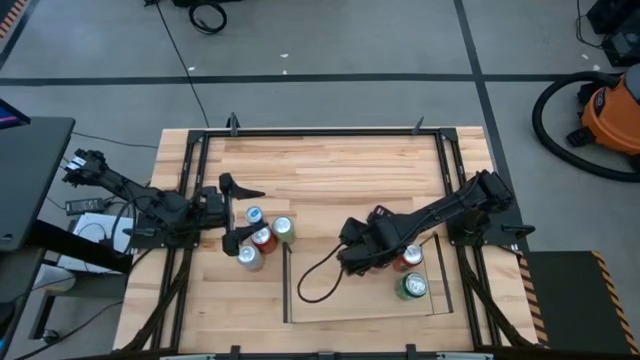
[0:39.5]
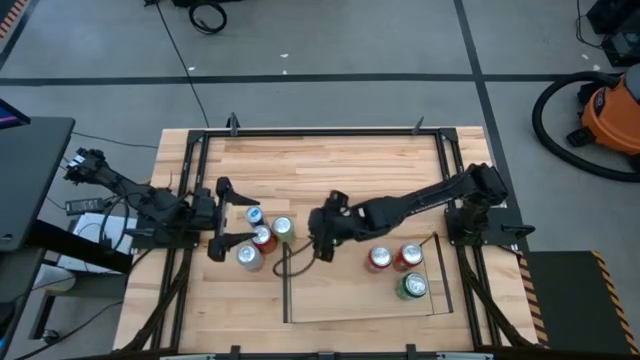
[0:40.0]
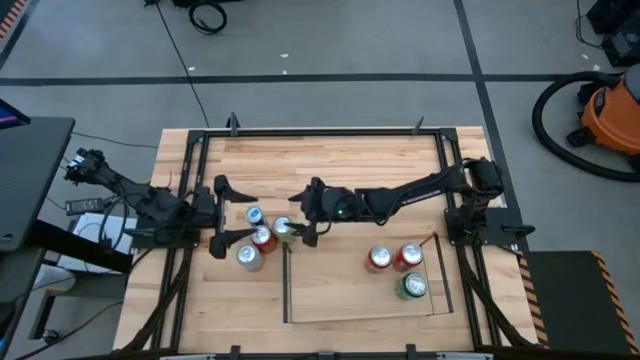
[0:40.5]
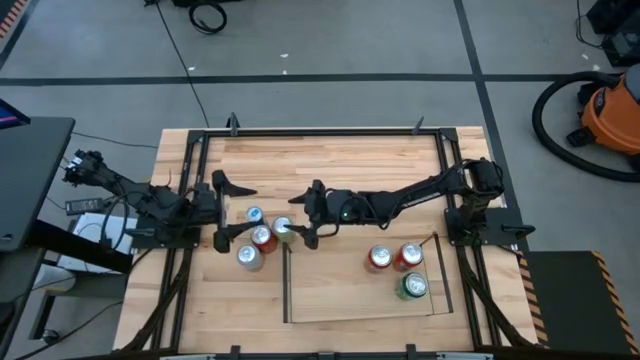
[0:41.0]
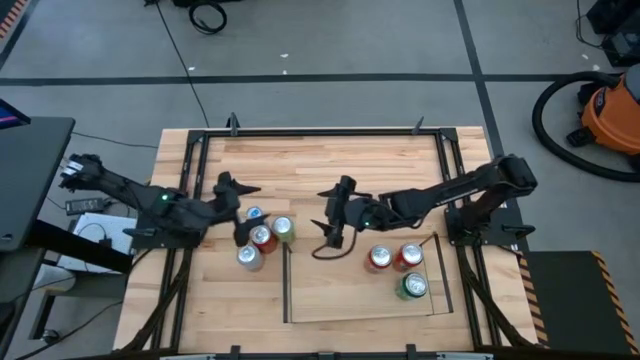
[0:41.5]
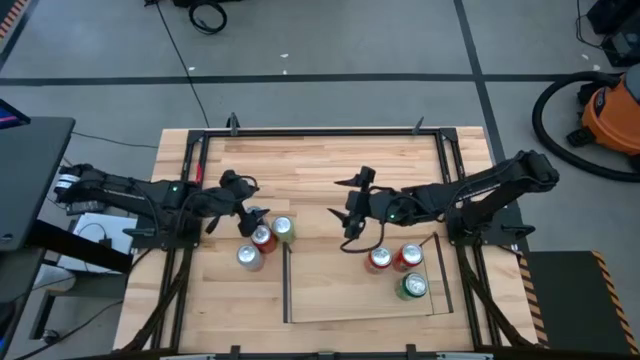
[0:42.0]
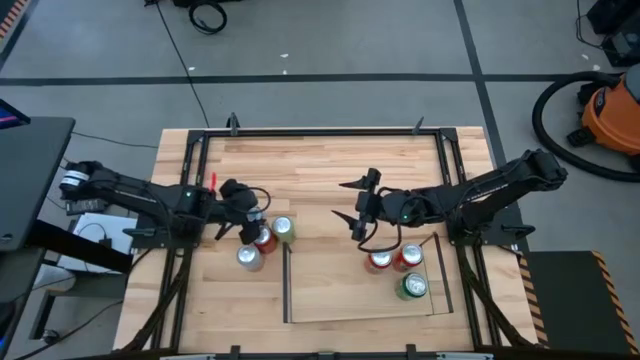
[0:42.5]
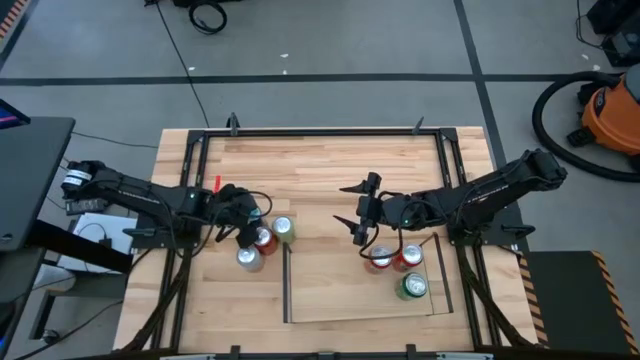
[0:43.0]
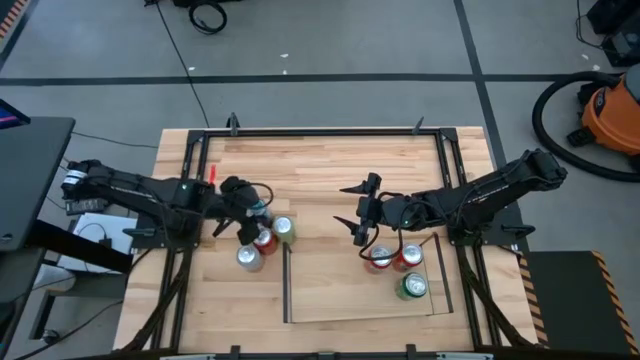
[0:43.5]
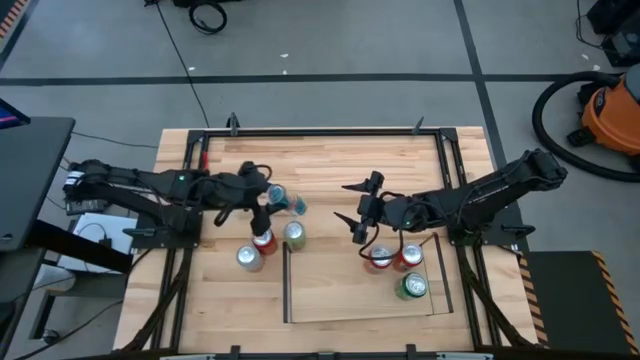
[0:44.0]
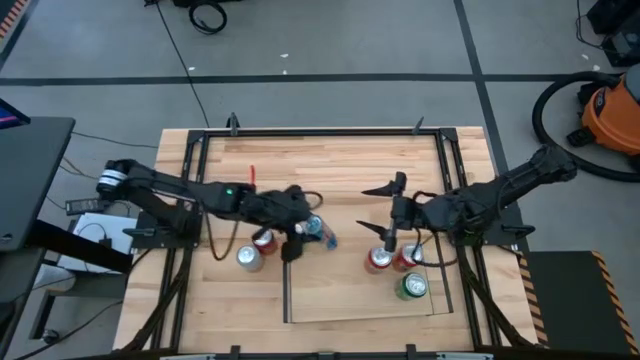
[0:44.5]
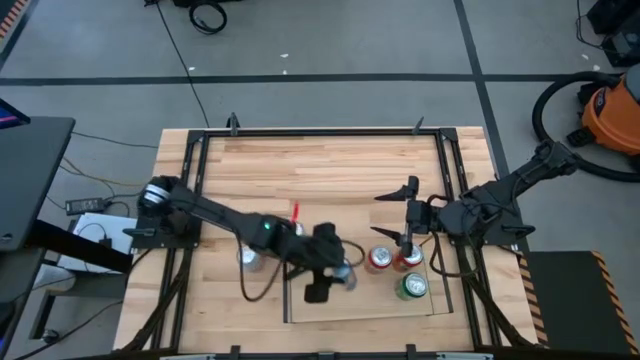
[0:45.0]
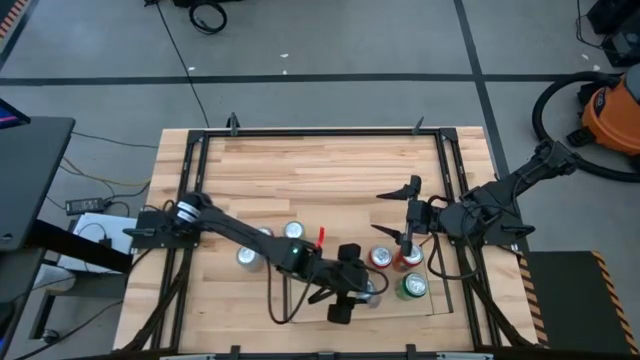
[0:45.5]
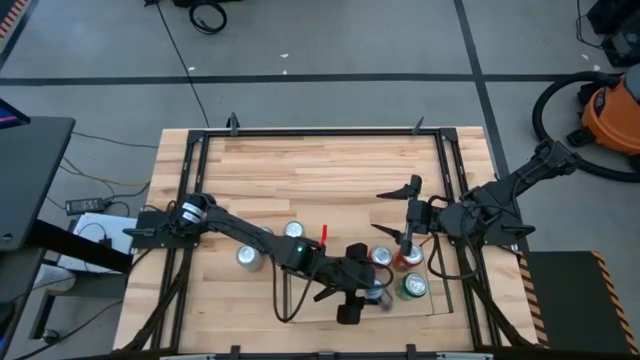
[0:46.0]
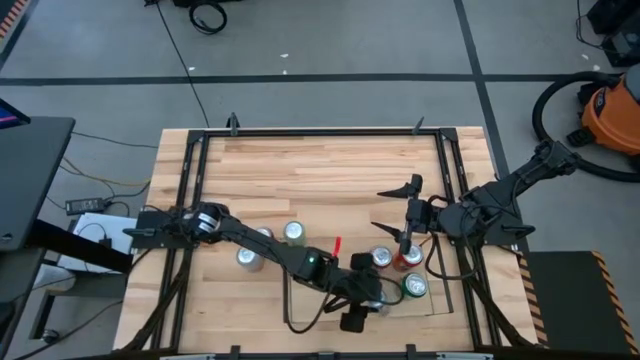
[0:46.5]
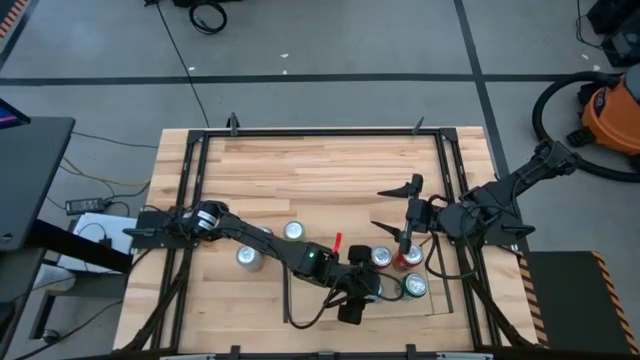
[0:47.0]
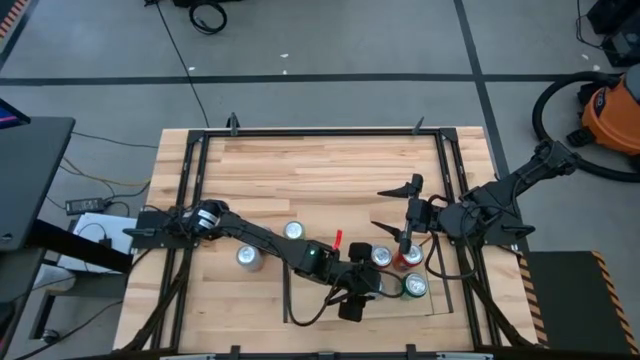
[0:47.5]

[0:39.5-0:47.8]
Task: Place canned beverage on shelf
Put the blue soda can on the shelf

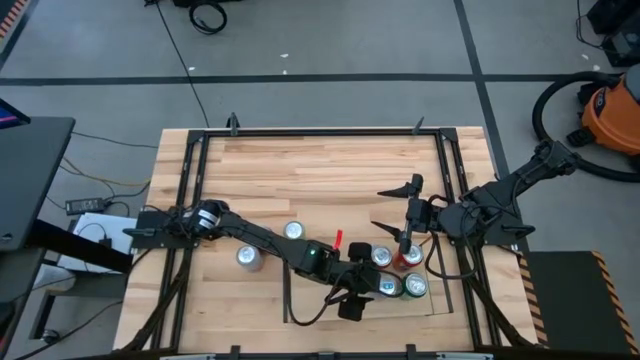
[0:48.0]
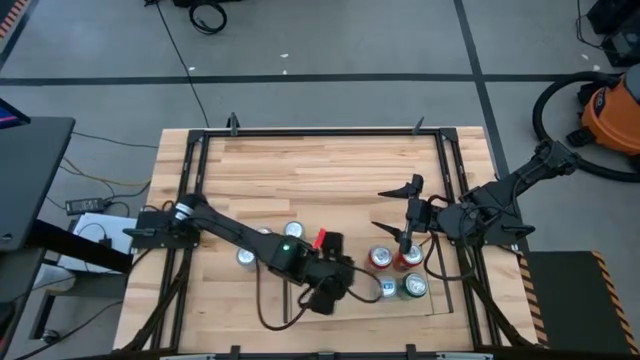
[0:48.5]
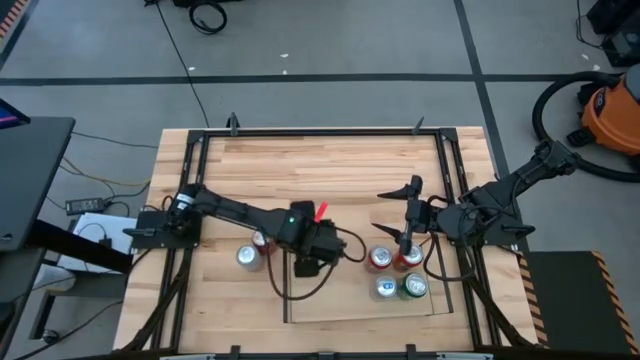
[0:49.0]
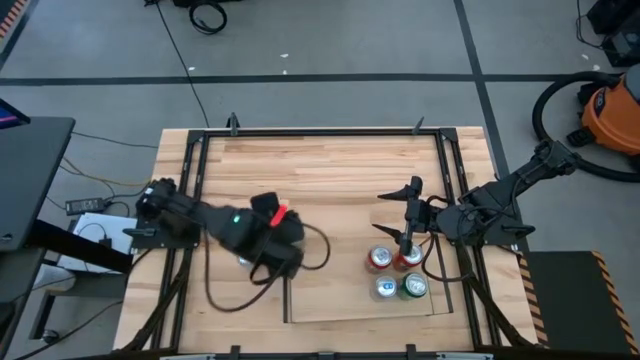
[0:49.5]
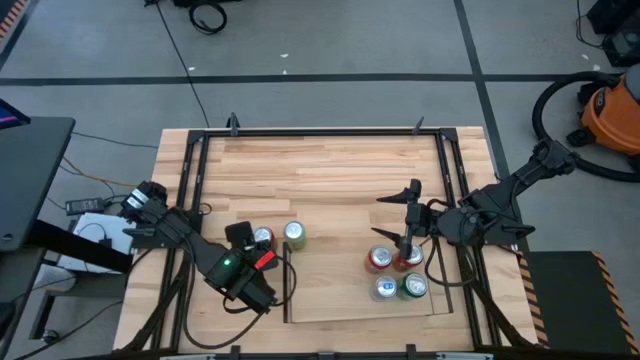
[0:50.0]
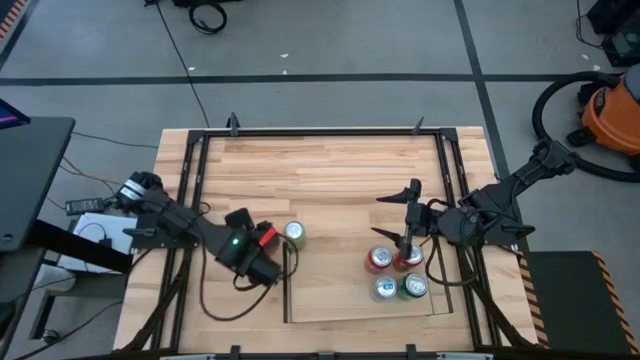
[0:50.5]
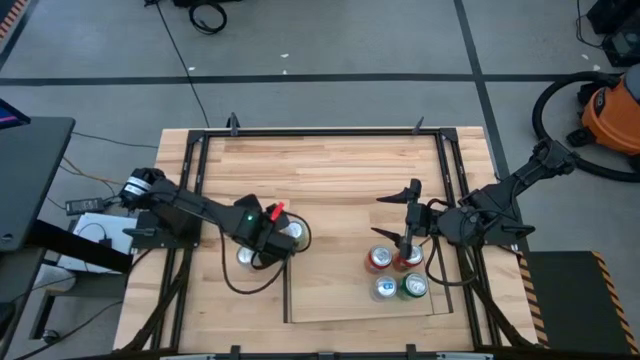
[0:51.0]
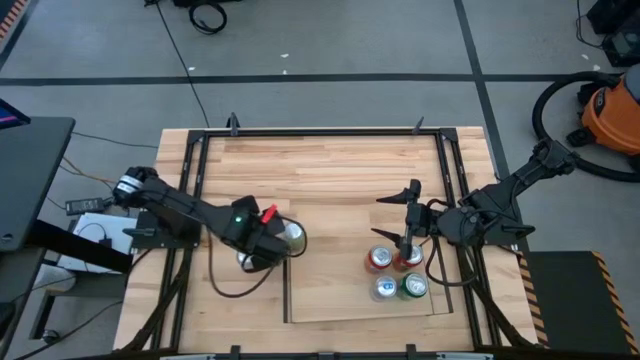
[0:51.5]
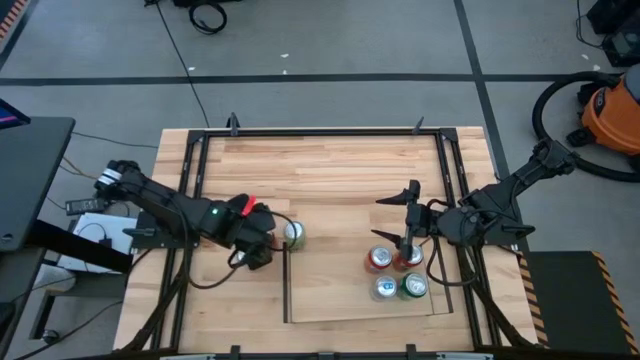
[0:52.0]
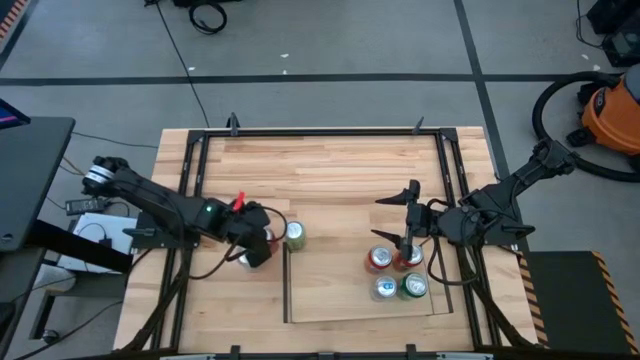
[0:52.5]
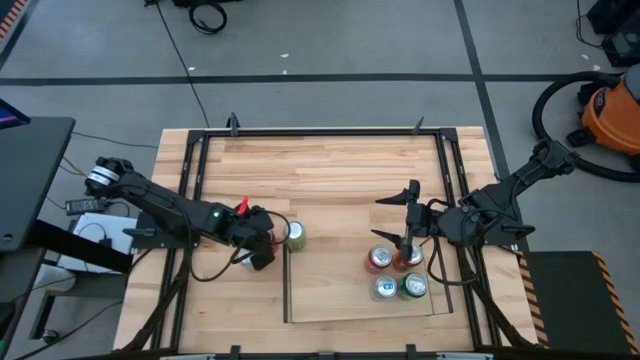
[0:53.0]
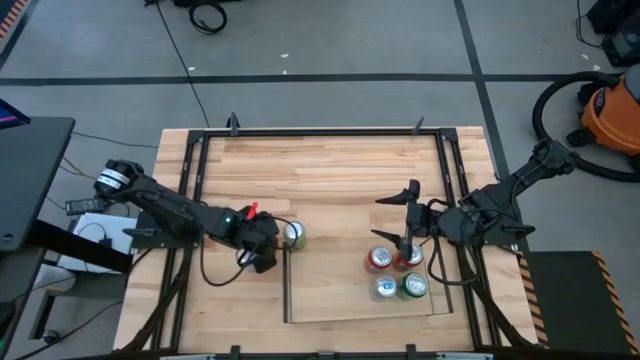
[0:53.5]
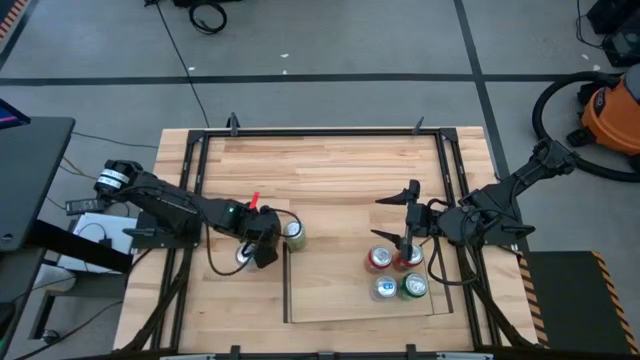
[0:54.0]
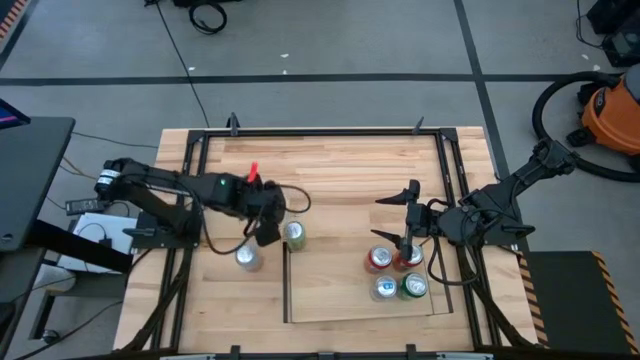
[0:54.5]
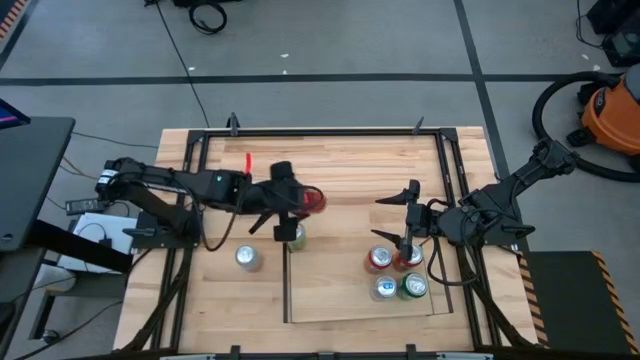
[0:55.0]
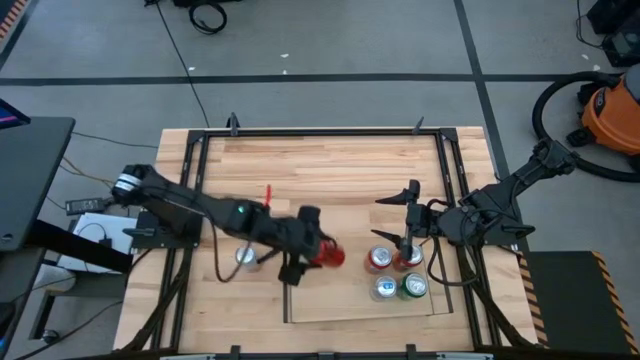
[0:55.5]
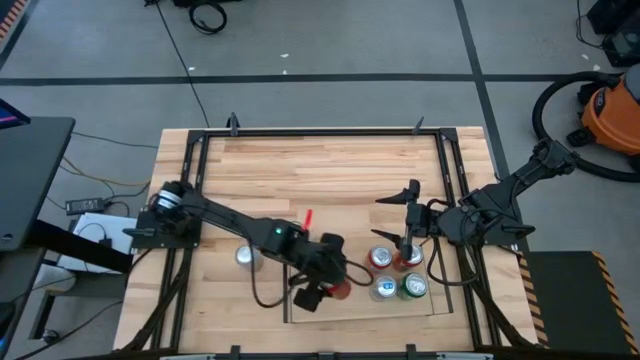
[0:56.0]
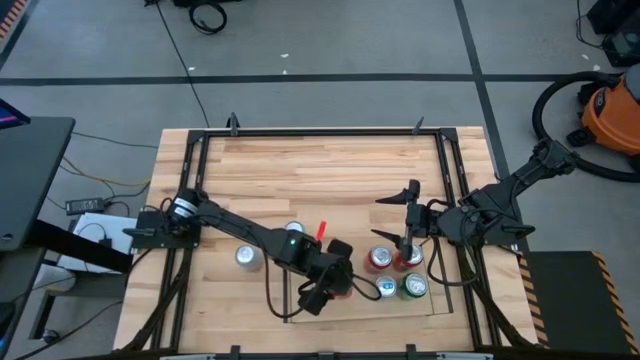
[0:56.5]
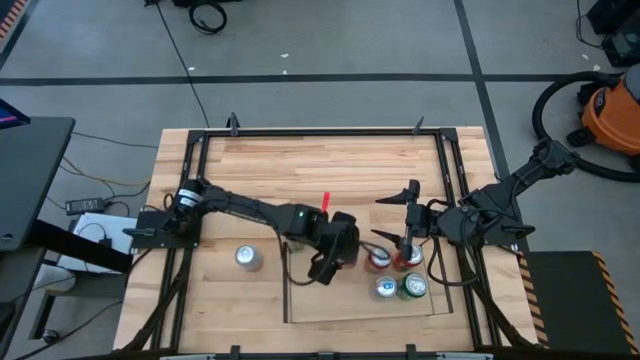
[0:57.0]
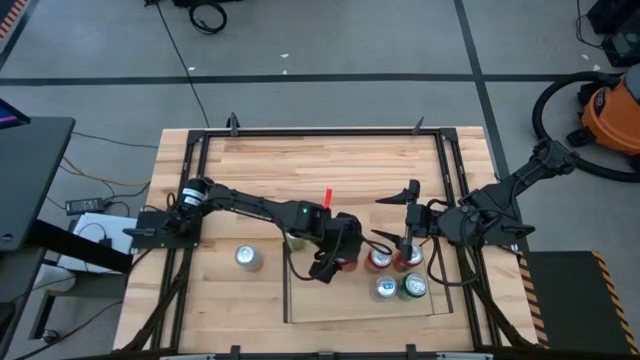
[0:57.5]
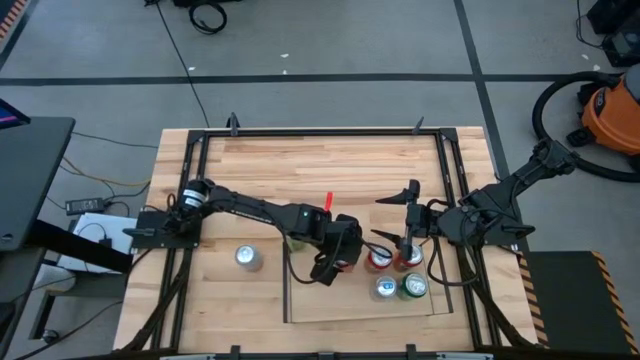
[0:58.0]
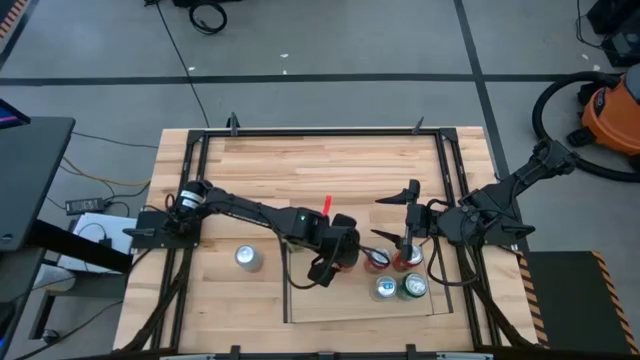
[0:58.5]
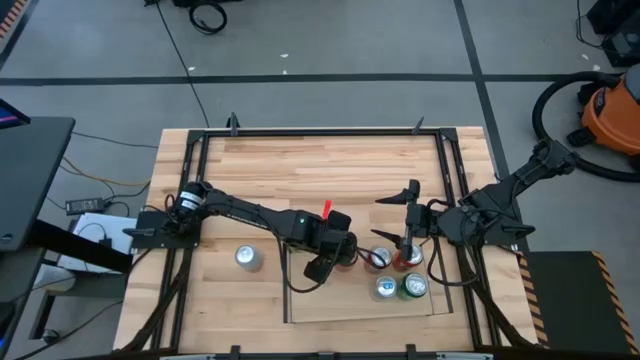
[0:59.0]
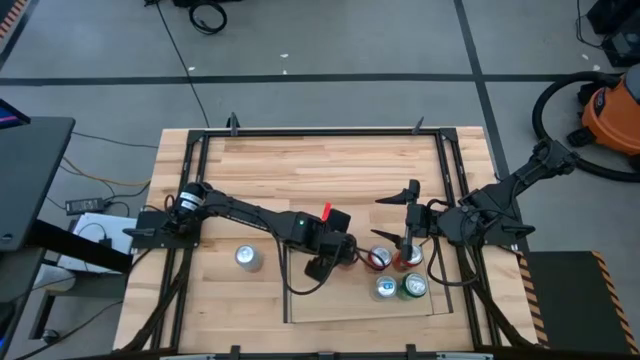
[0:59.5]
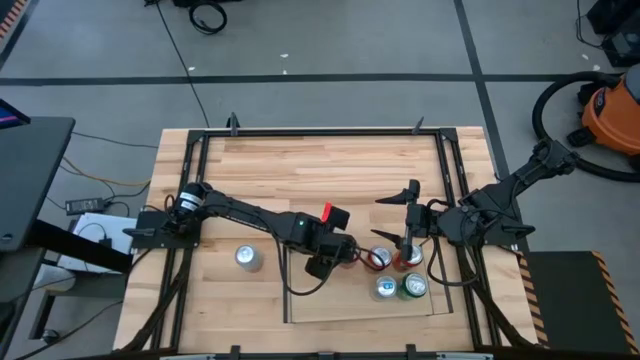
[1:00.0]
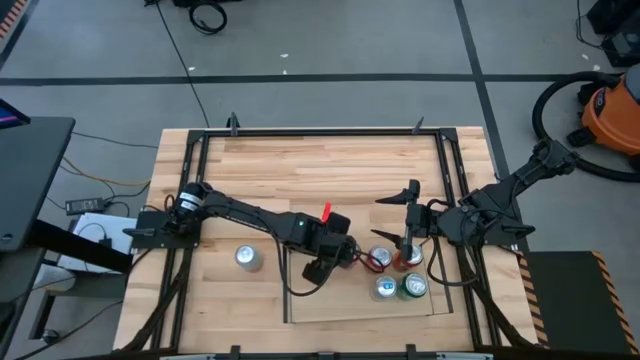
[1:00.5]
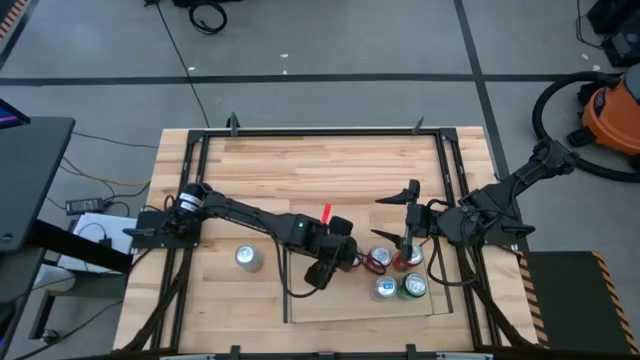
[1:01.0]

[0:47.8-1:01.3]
Put the red-black soda can on the shelf
